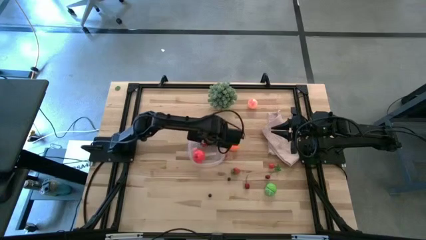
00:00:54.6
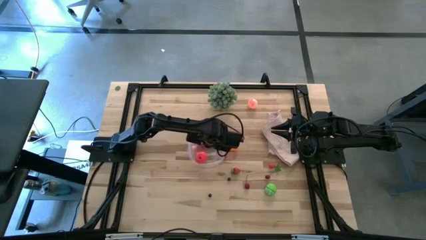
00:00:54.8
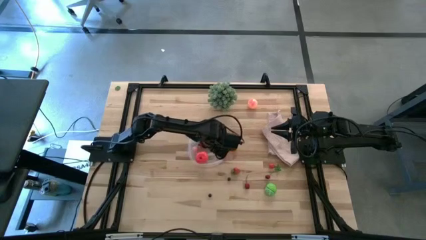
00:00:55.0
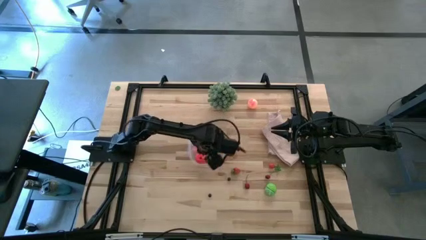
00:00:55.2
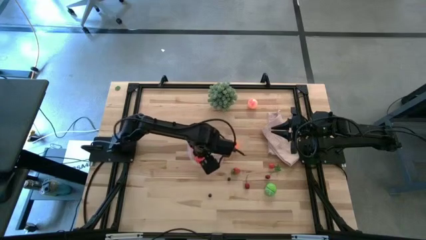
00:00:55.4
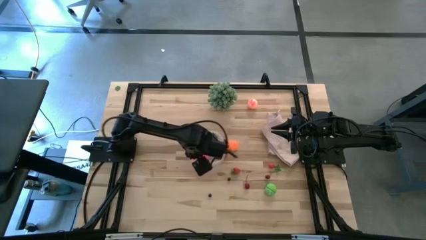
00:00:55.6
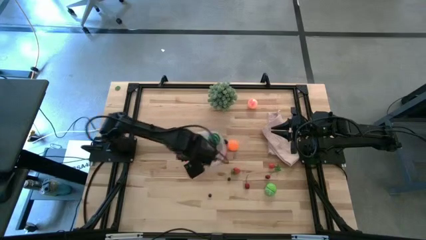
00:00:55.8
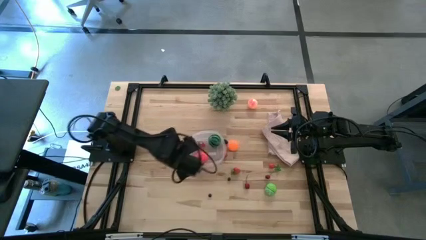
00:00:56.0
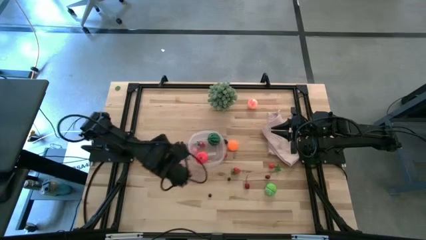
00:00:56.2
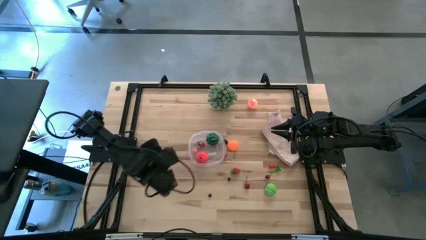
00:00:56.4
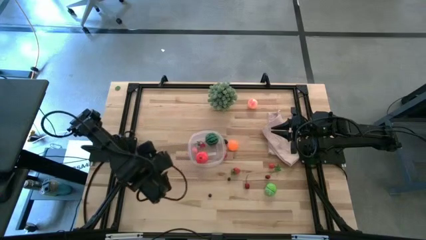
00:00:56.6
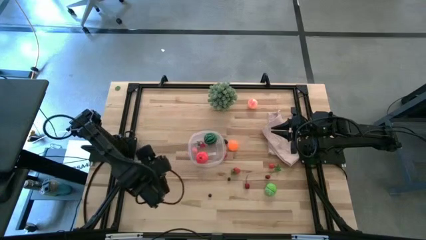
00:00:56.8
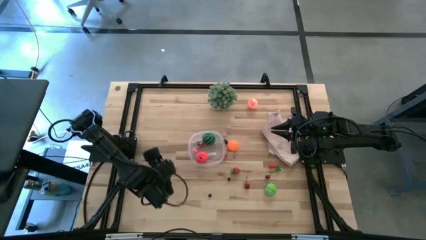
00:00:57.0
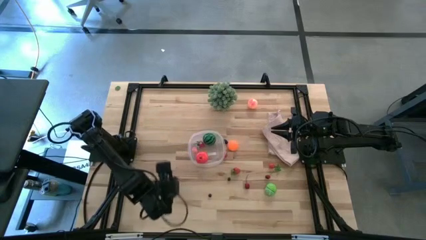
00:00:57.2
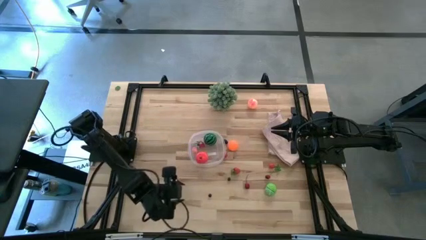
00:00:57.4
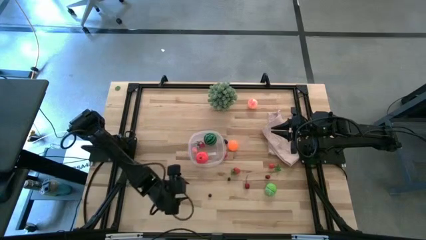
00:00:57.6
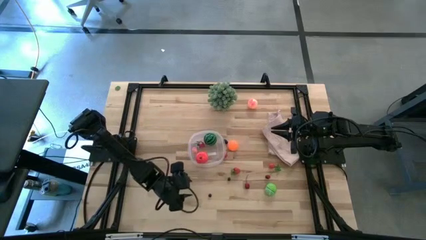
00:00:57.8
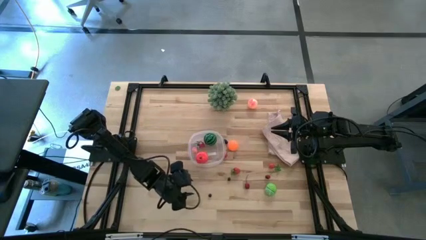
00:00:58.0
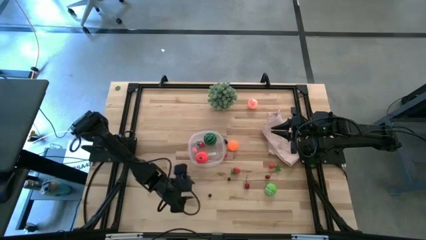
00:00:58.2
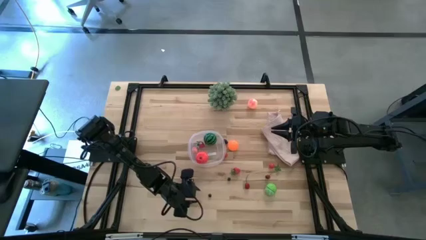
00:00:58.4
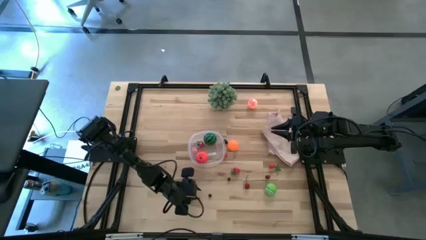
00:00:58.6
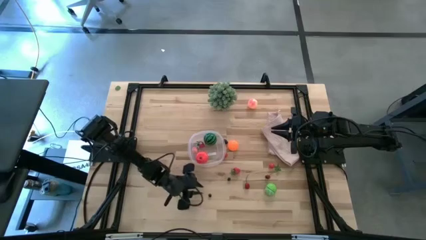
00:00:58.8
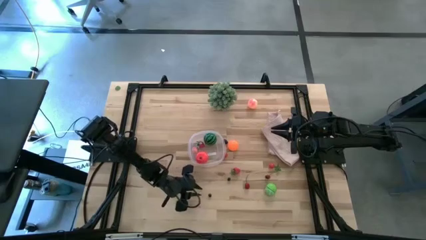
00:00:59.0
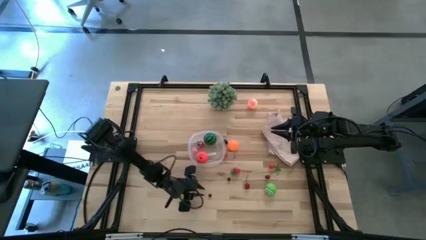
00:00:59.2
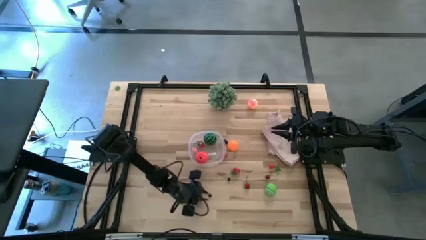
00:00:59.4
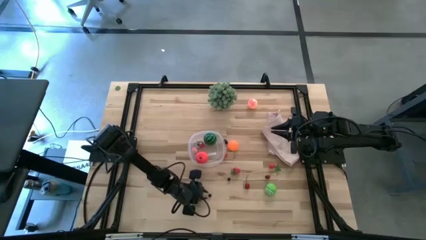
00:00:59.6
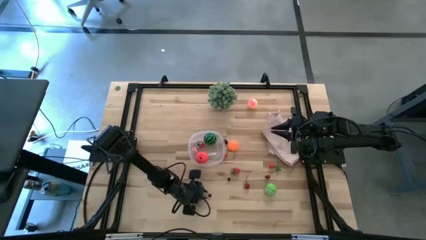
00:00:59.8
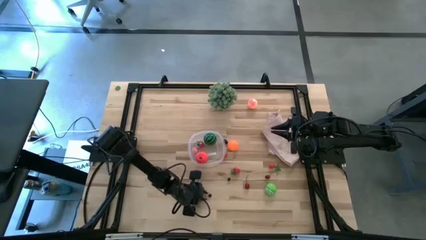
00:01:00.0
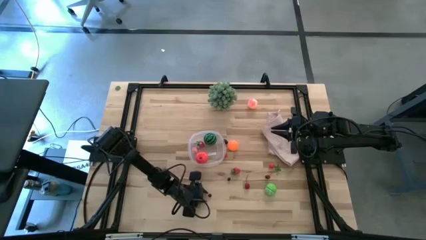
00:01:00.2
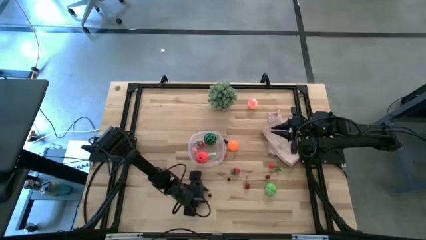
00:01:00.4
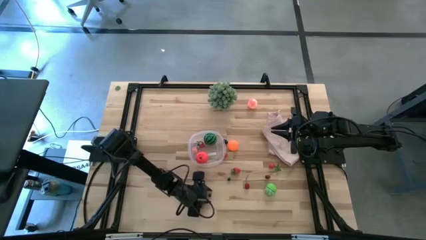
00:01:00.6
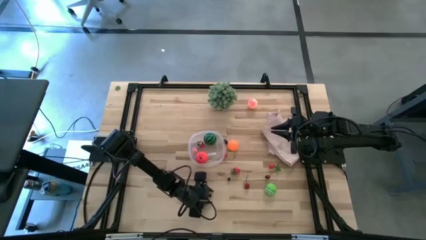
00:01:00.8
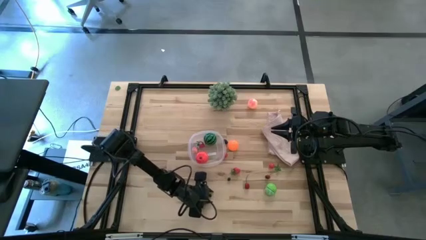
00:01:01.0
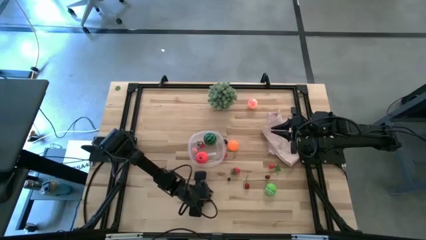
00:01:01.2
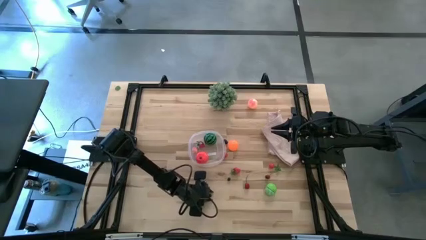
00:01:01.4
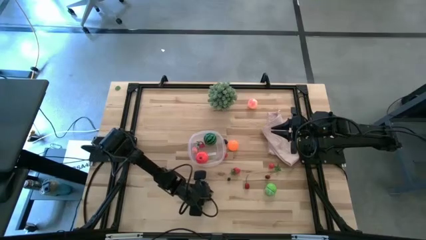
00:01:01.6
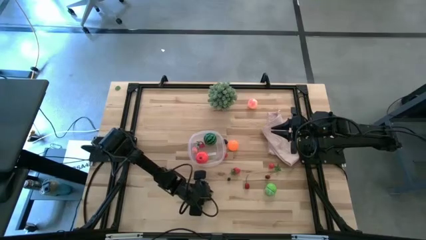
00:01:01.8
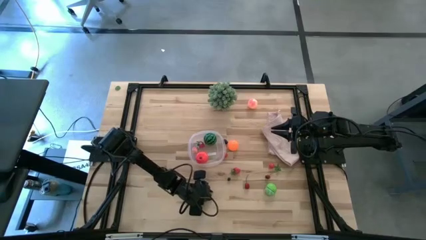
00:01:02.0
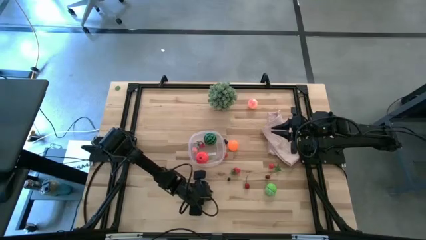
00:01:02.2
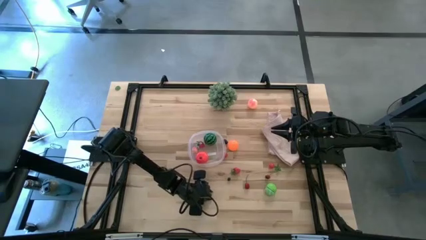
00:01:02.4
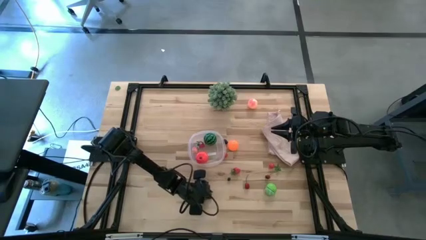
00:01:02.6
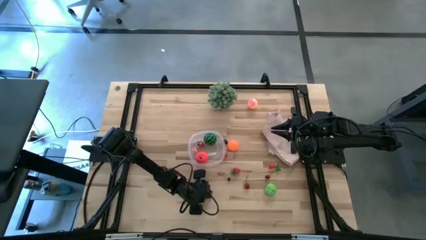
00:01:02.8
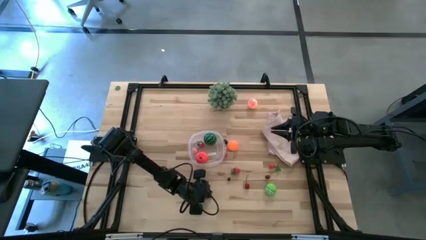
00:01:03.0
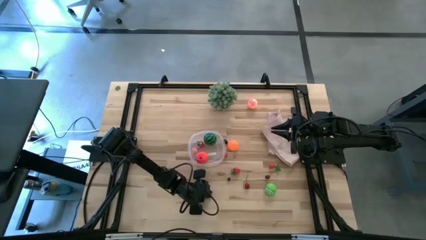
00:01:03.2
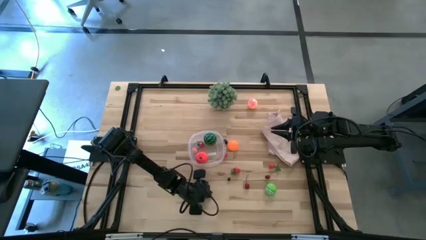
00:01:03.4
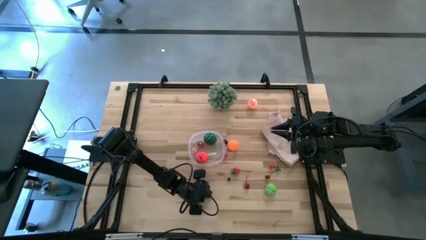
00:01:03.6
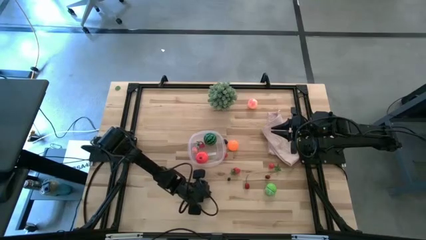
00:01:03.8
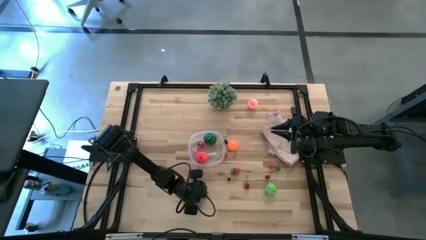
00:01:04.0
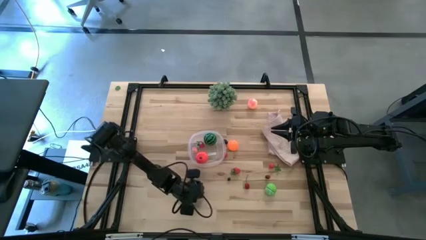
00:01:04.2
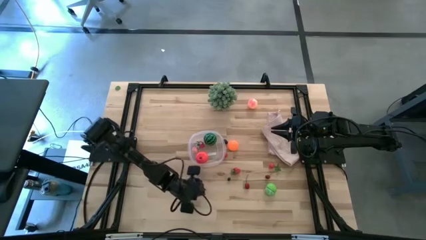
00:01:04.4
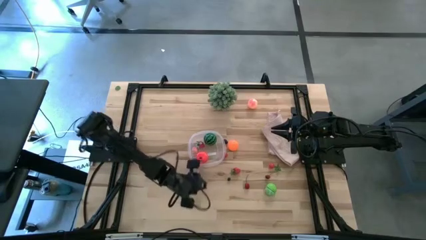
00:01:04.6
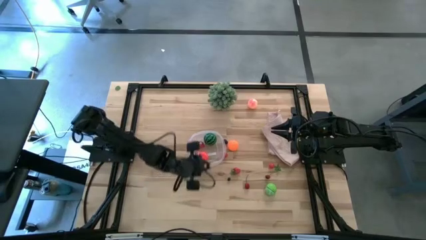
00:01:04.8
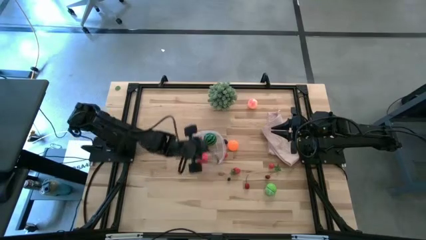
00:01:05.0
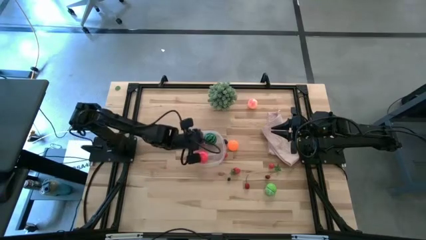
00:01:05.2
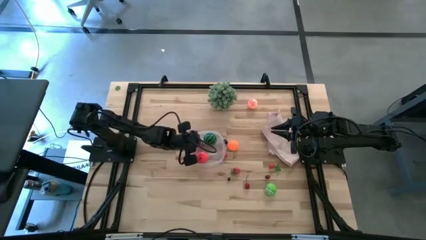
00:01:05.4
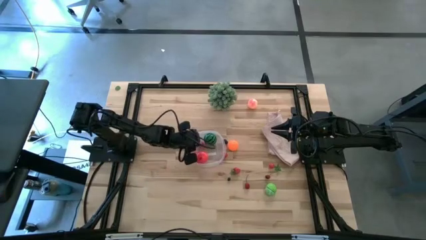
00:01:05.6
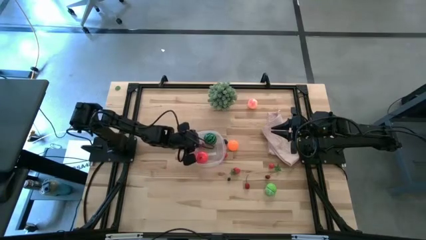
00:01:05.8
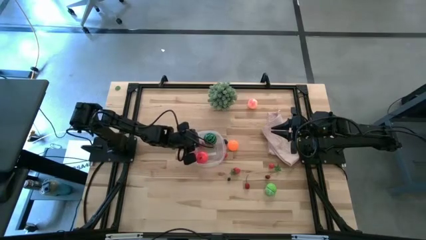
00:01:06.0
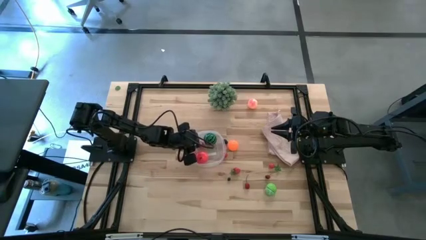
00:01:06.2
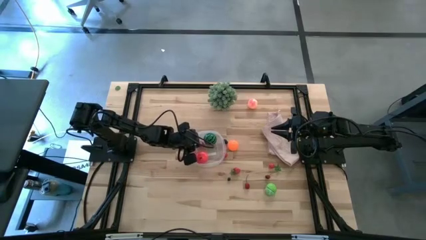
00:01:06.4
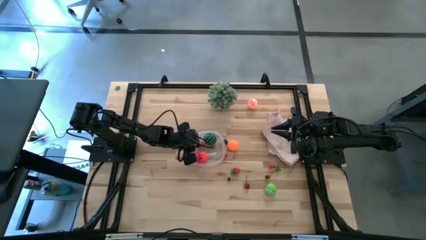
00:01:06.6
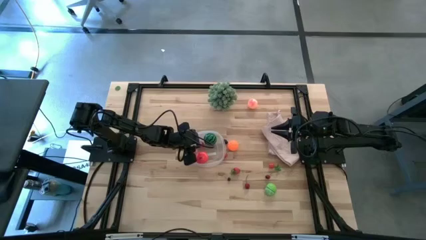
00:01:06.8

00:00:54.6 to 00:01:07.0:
Task: Pick and placing Produce into tupperware
Put the bottom blueberry into the transparent bin
